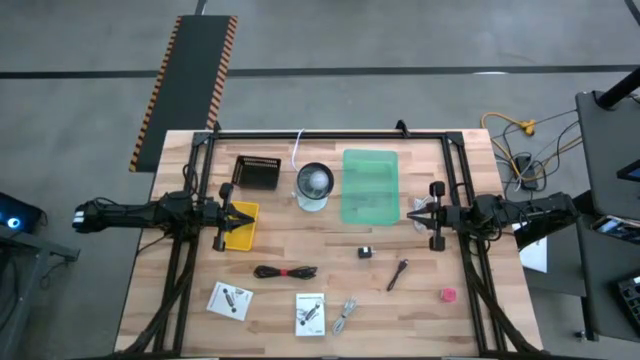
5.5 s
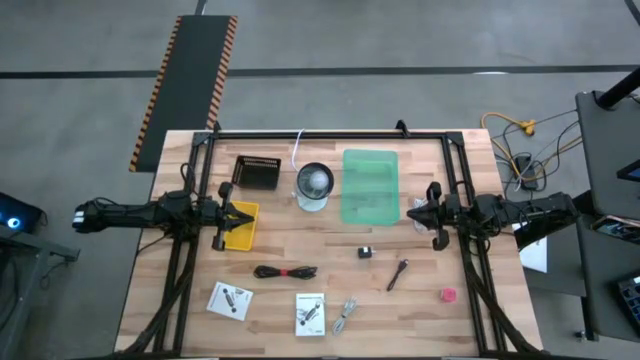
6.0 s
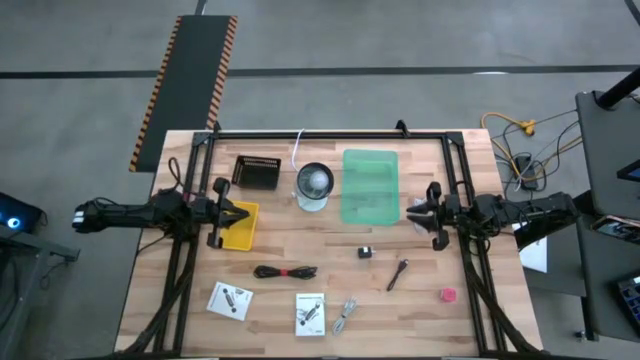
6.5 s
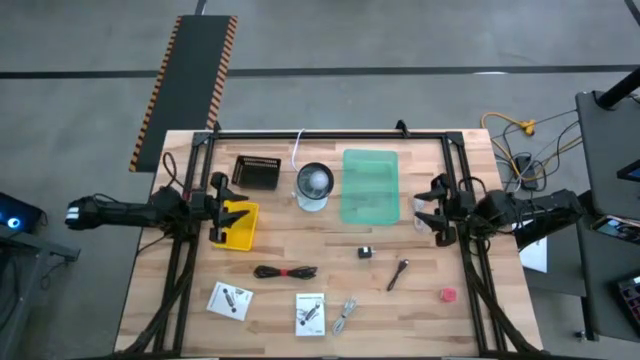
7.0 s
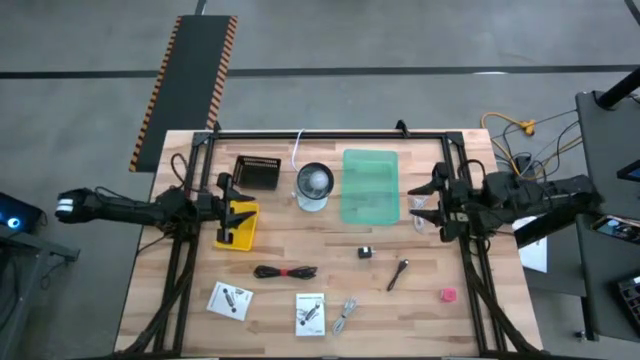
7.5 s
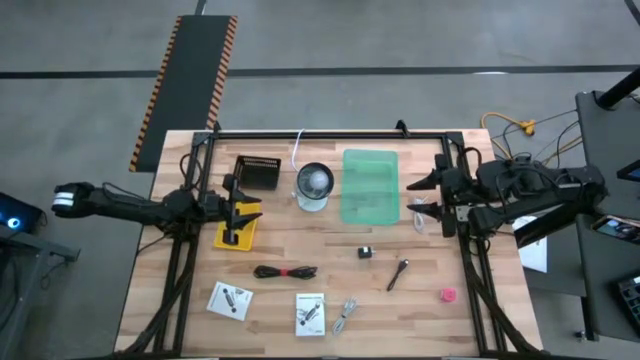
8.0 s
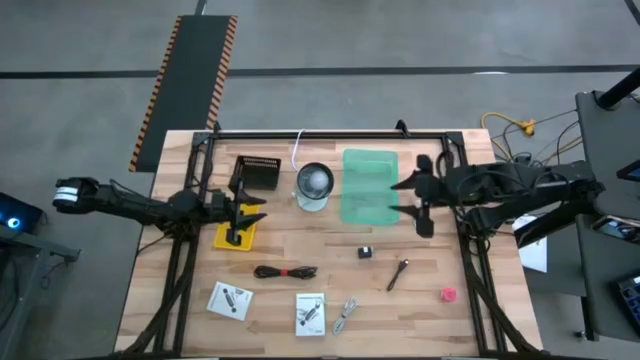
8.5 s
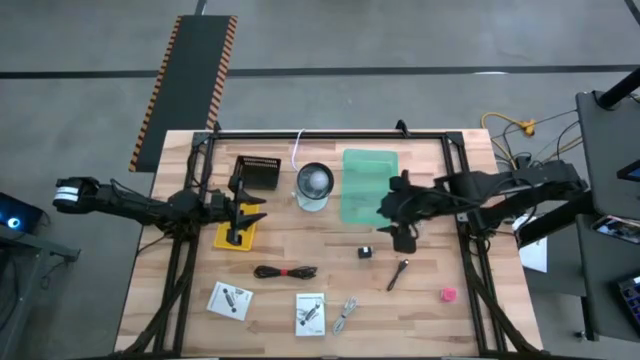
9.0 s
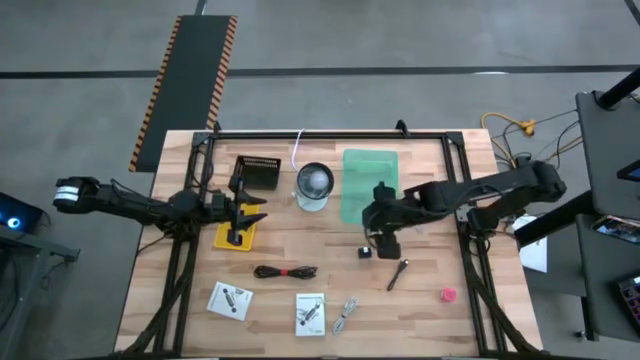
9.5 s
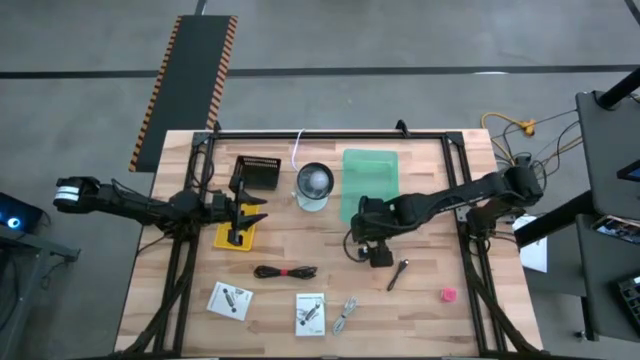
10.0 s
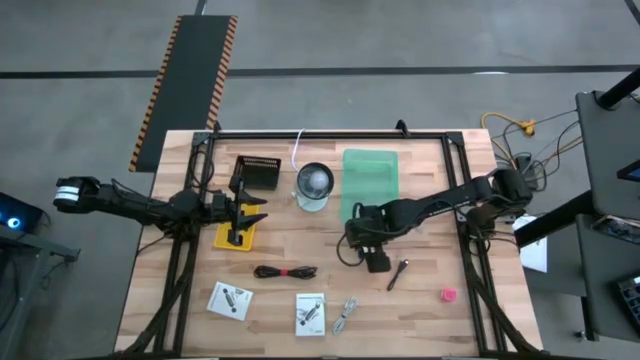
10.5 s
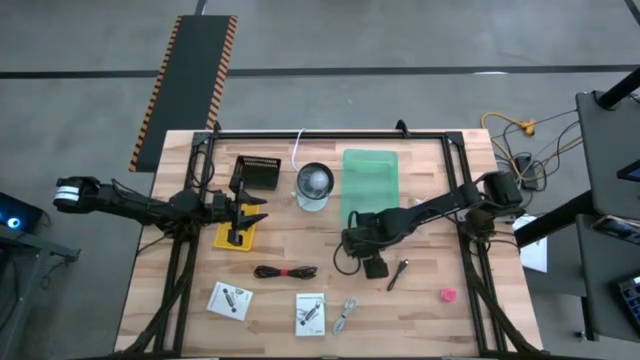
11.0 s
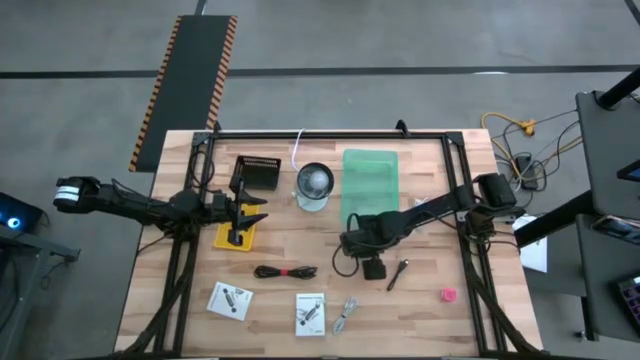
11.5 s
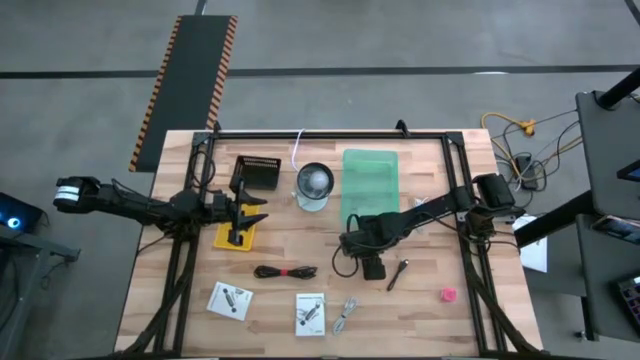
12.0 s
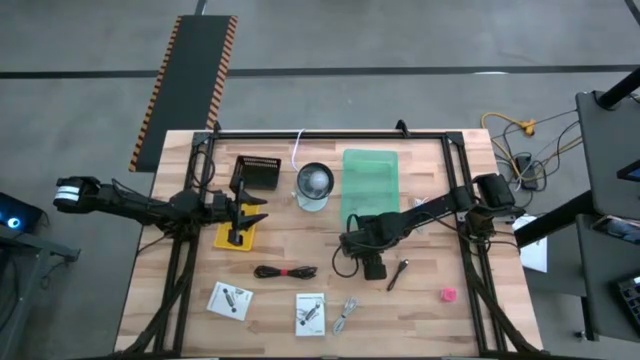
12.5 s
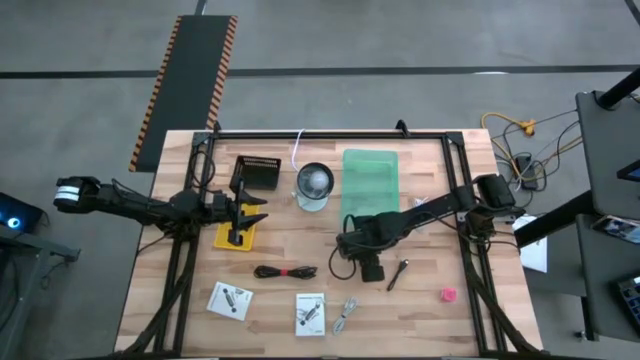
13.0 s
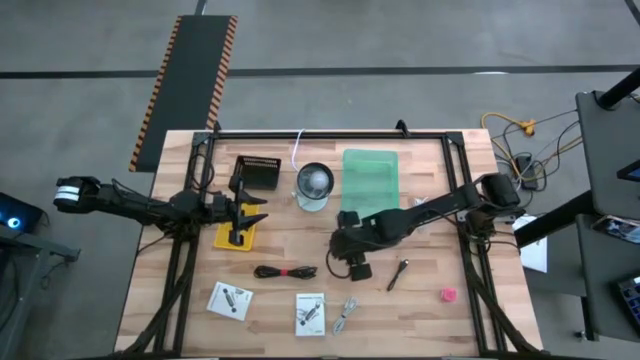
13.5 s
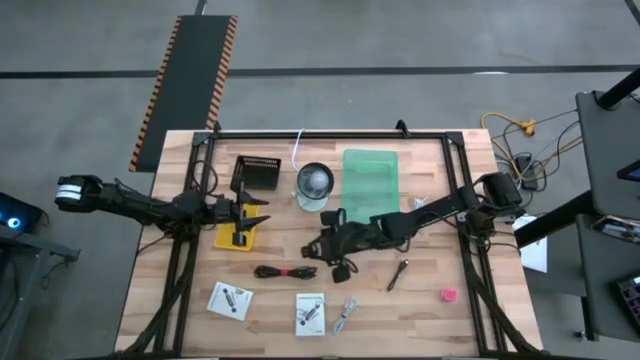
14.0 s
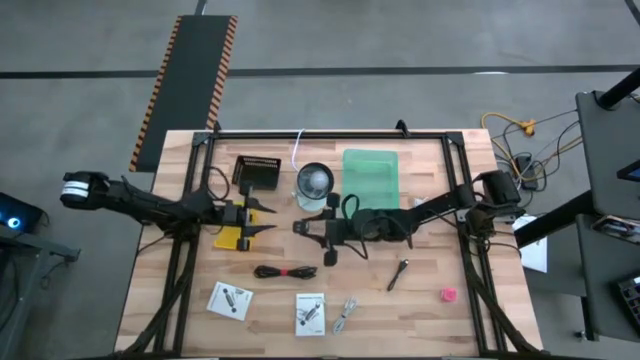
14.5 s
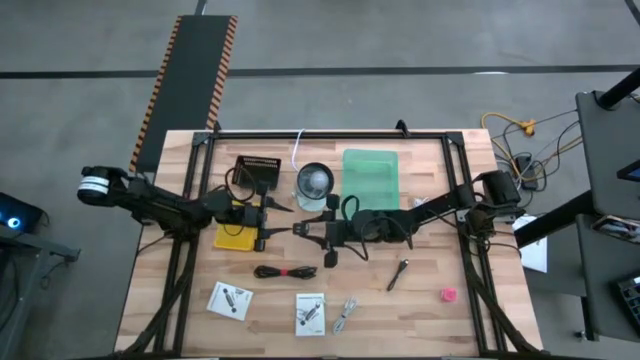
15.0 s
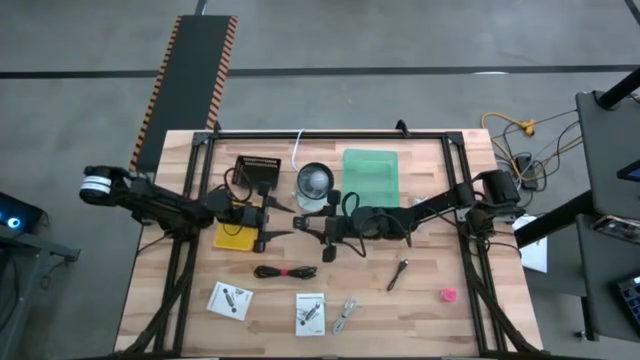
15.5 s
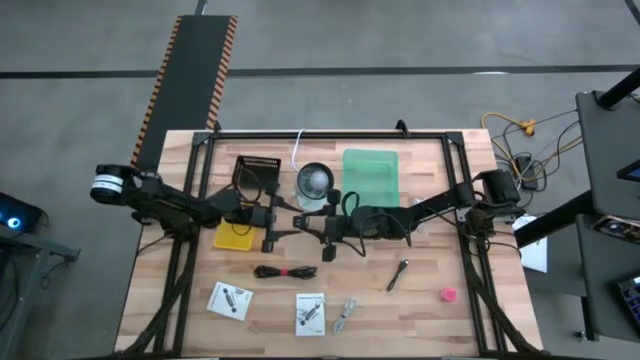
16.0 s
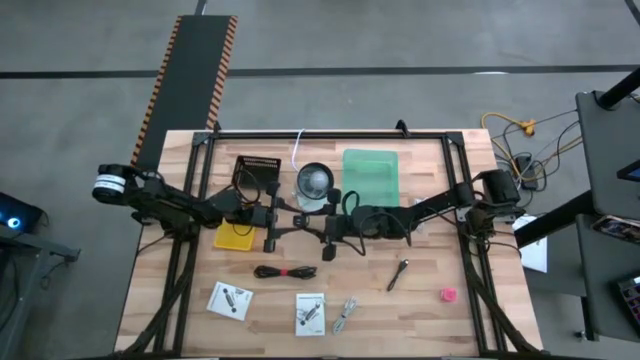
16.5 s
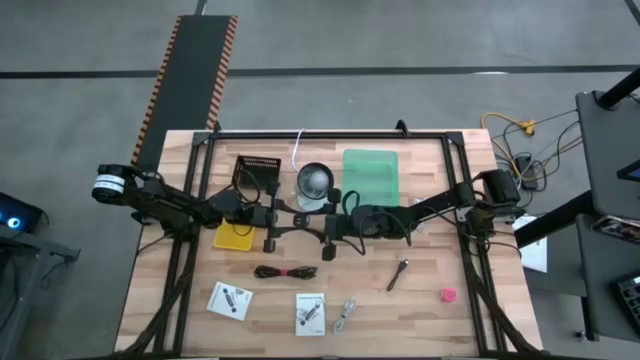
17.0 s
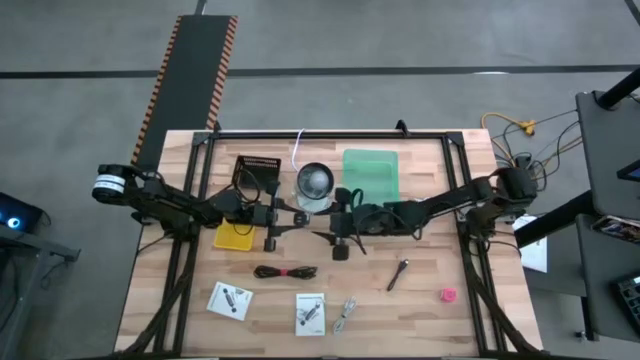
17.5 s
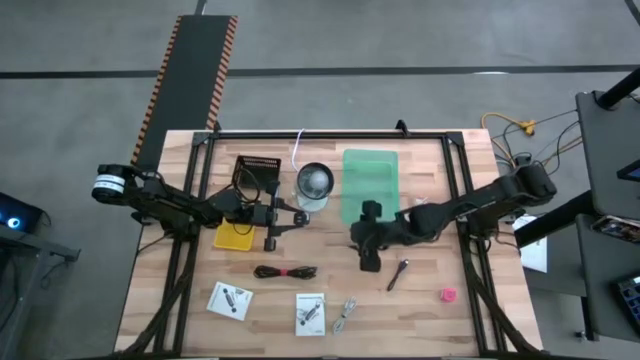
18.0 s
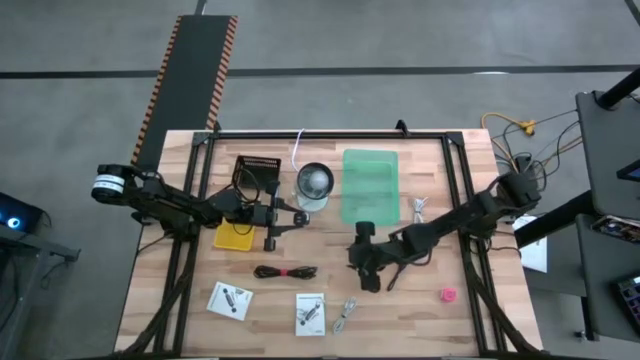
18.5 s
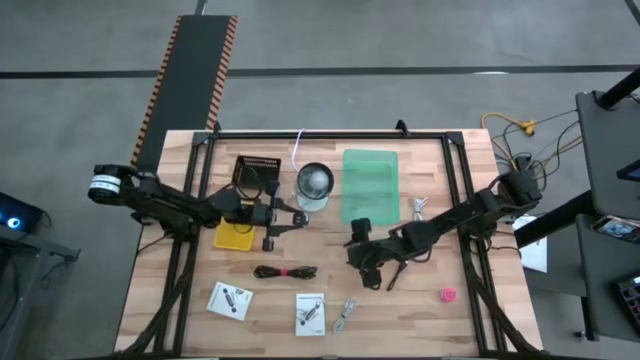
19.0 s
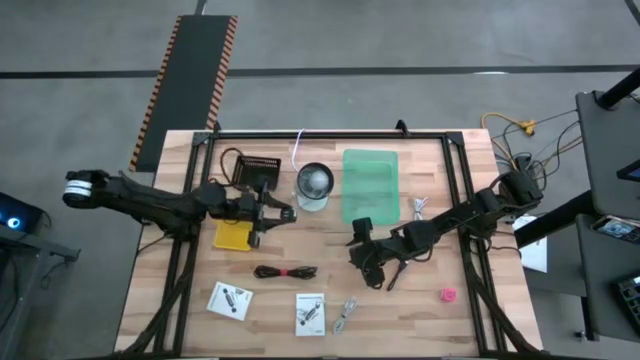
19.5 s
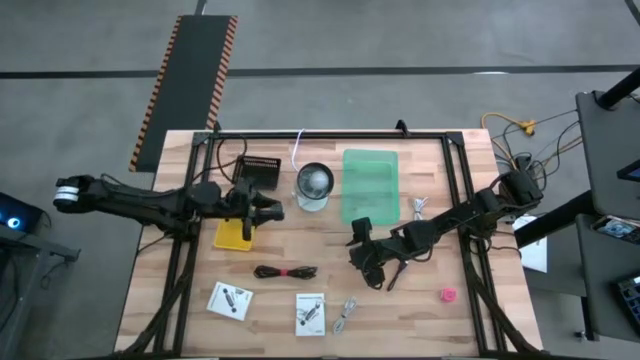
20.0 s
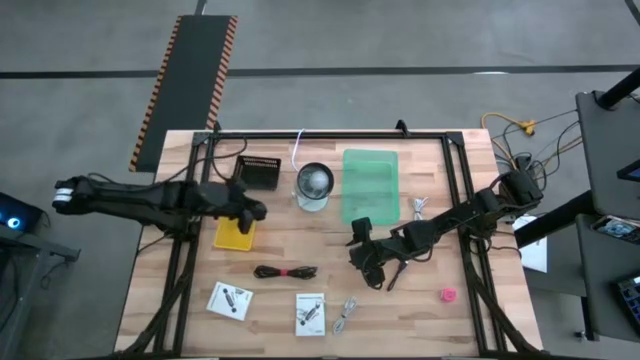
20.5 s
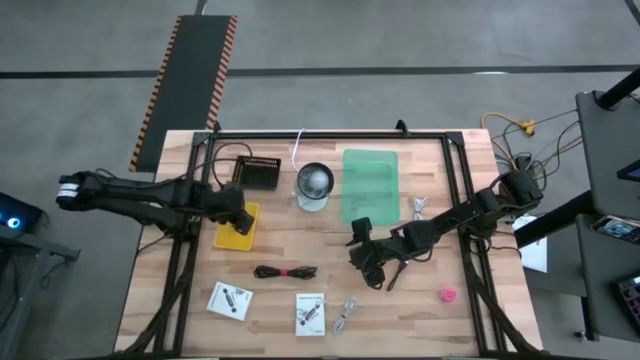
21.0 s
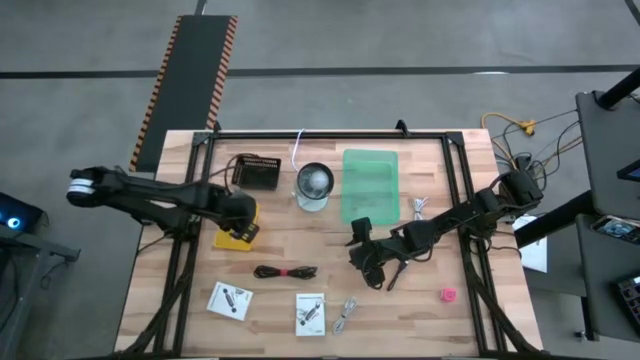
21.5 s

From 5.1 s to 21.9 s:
Task: Pick and place items into bin
Put the black charger adapter into the yellow bin

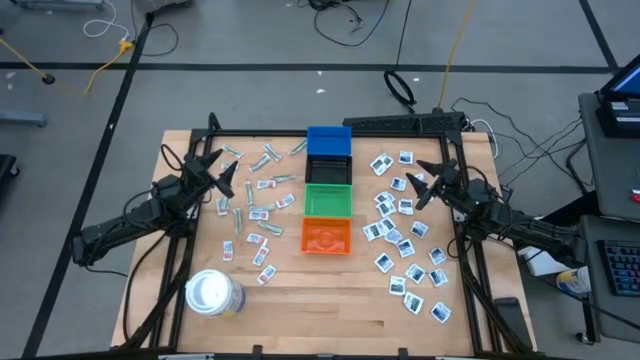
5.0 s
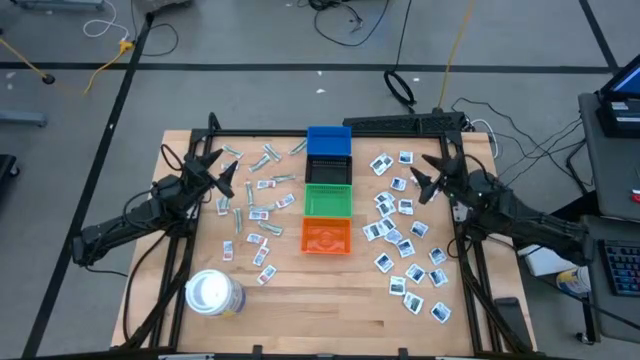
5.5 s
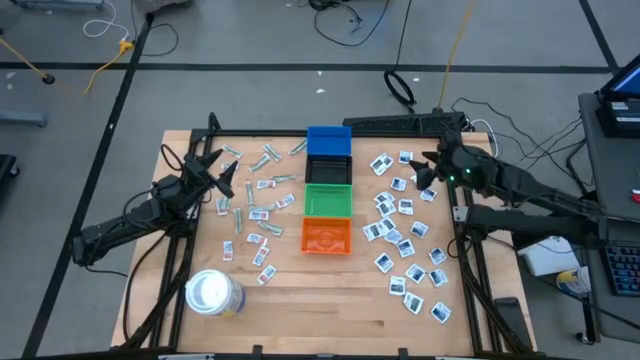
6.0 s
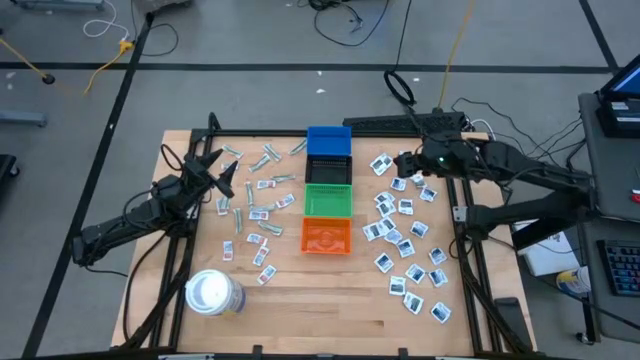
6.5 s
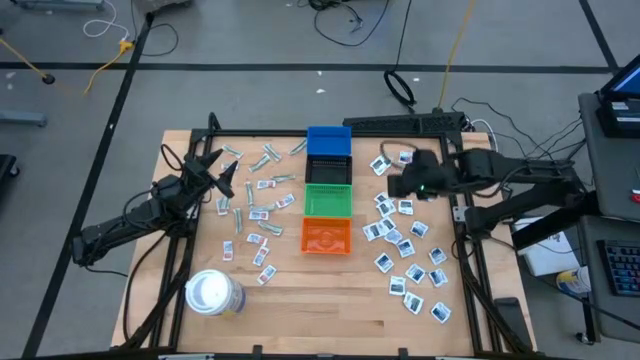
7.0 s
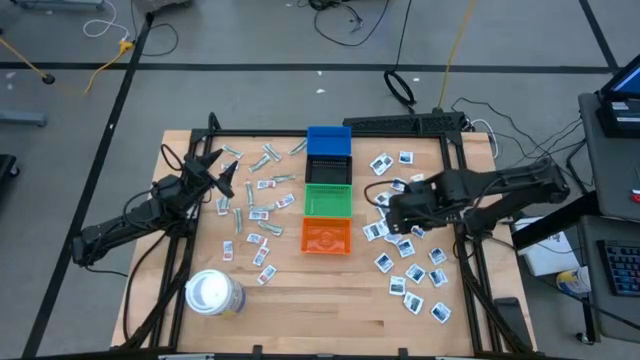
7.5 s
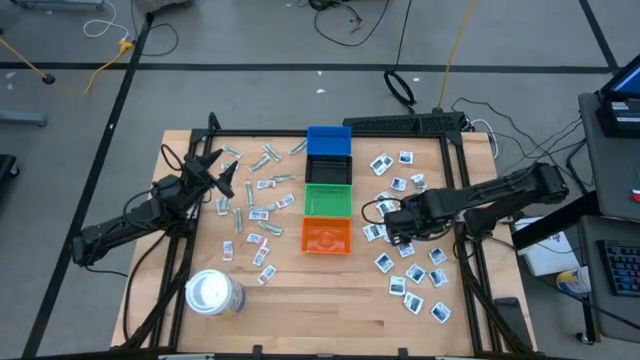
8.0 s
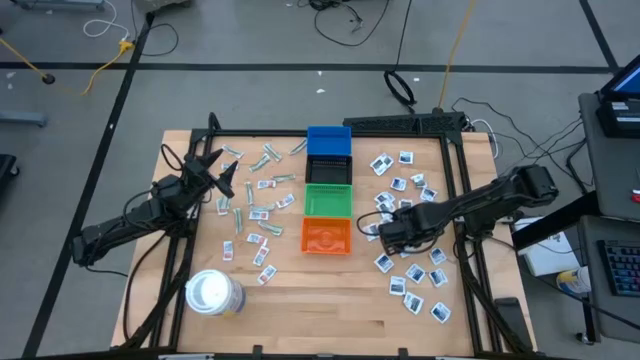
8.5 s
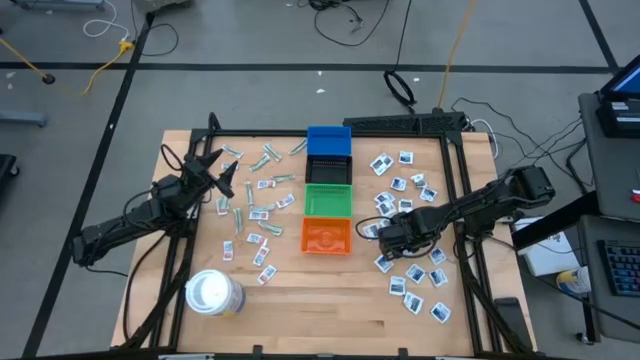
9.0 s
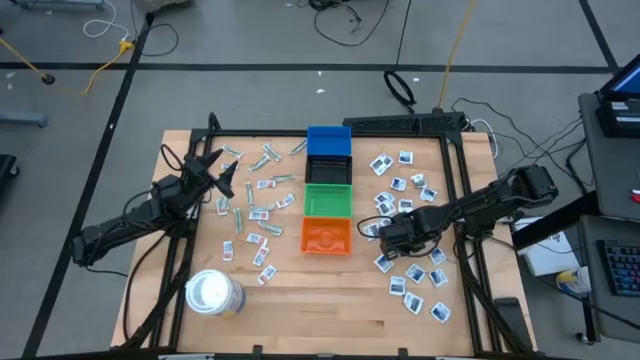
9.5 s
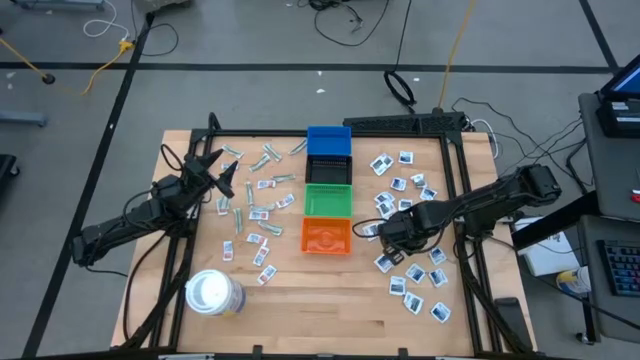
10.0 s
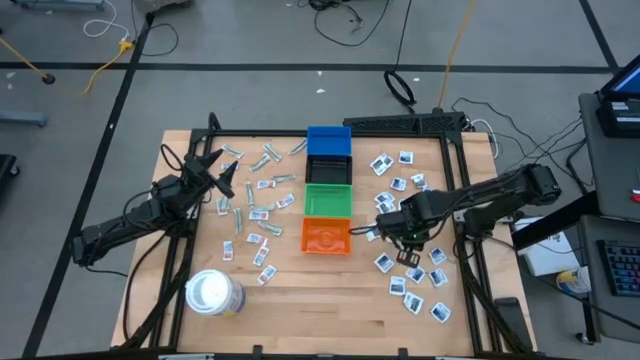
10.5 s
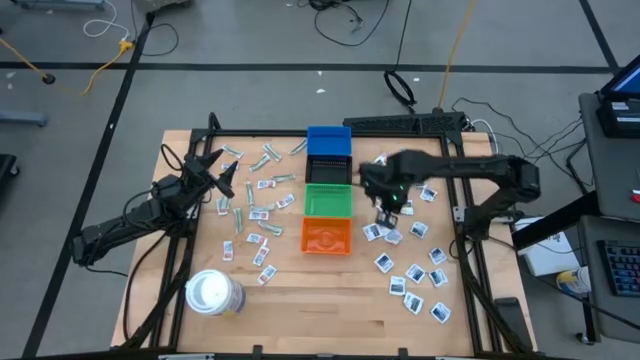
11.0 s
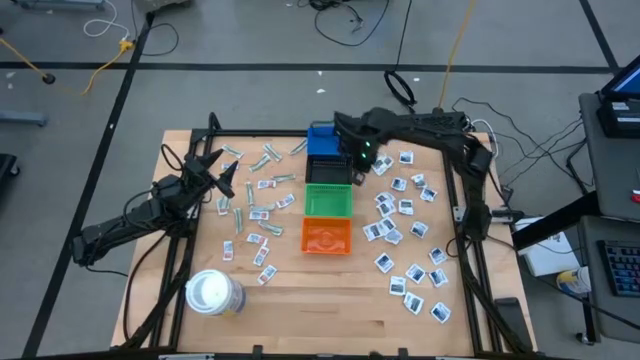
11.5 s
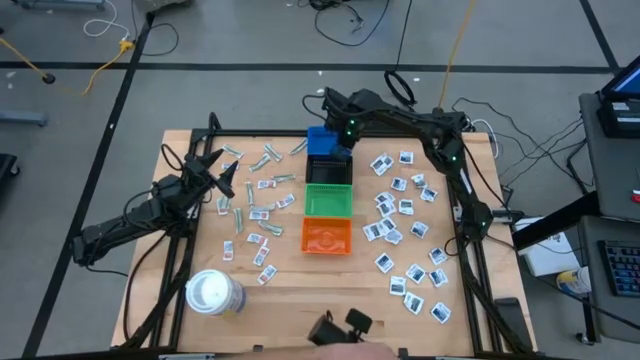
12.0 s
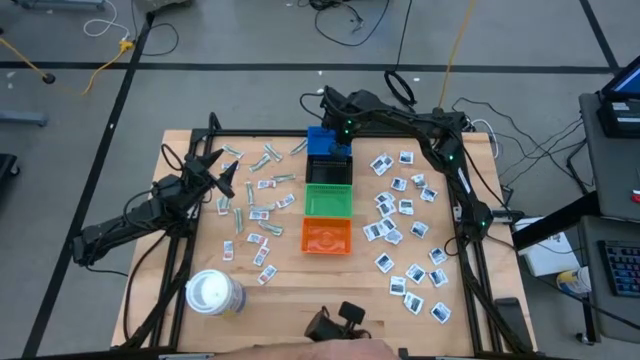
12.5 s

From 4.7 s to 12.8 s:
Task: Pick & Place First Aid Supplies
Put the blue alcohol pad into the blue bin
